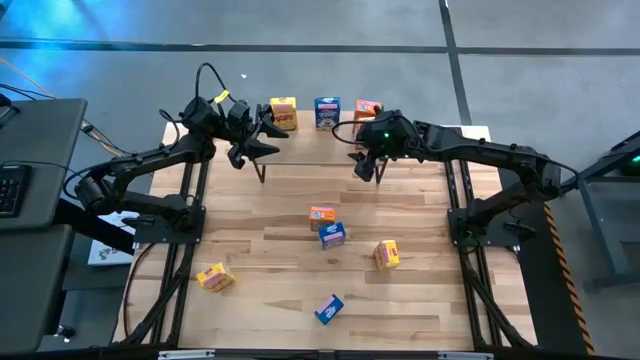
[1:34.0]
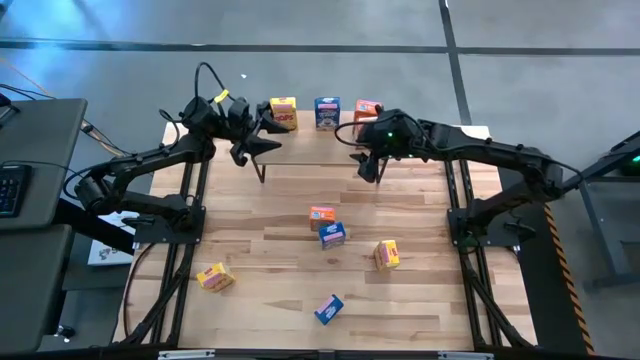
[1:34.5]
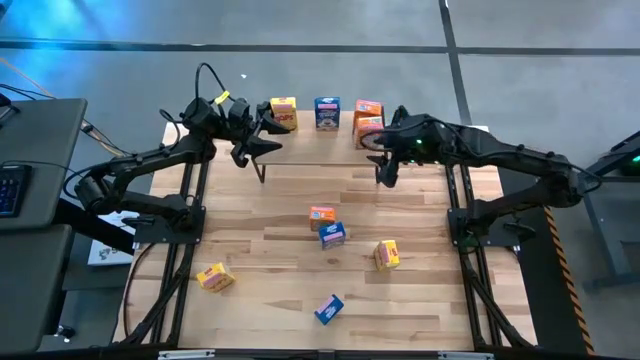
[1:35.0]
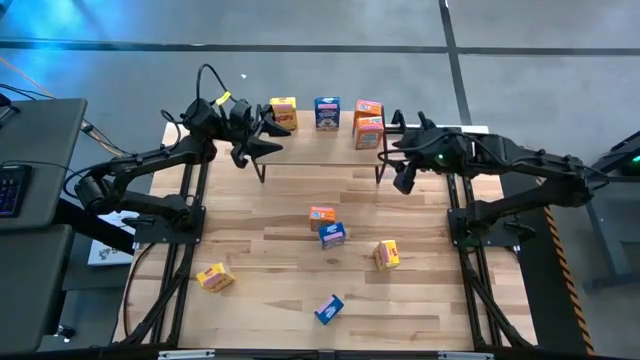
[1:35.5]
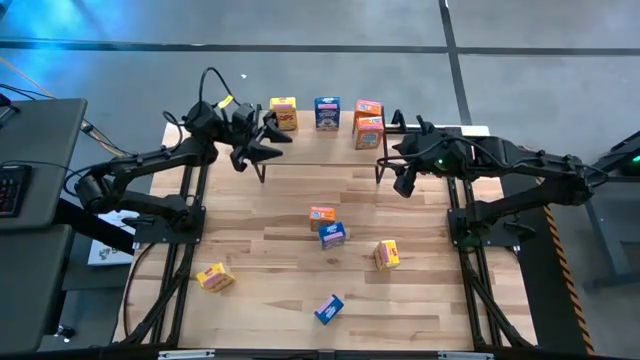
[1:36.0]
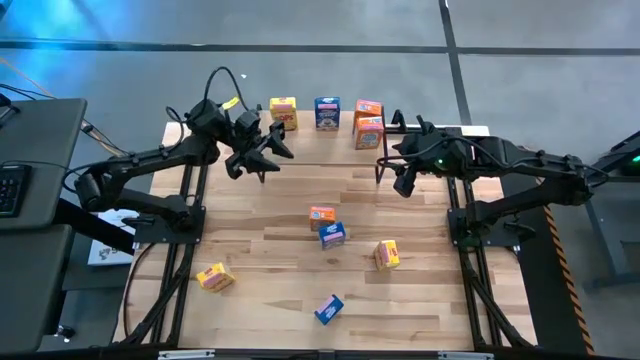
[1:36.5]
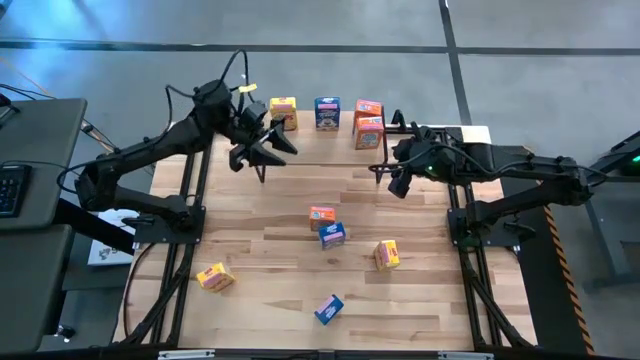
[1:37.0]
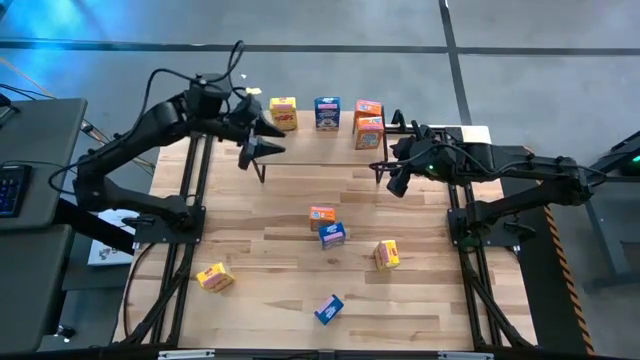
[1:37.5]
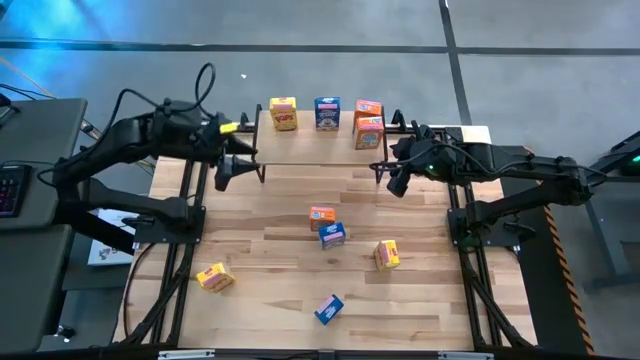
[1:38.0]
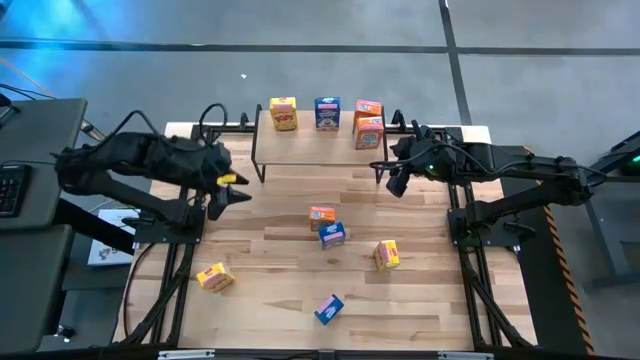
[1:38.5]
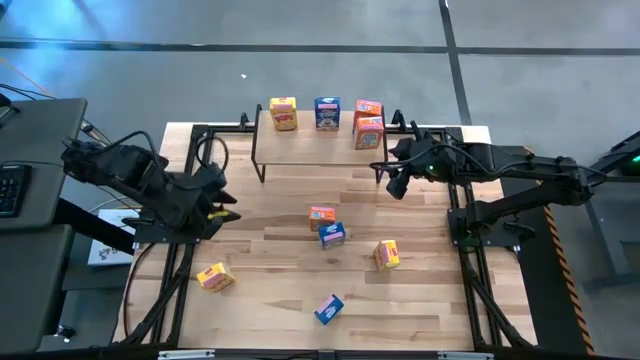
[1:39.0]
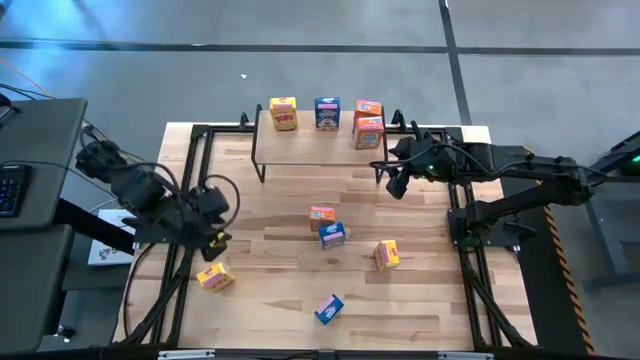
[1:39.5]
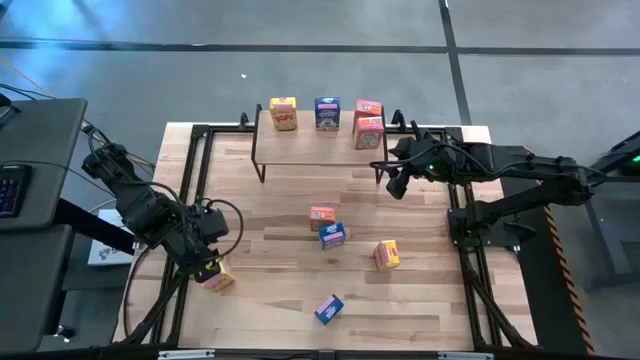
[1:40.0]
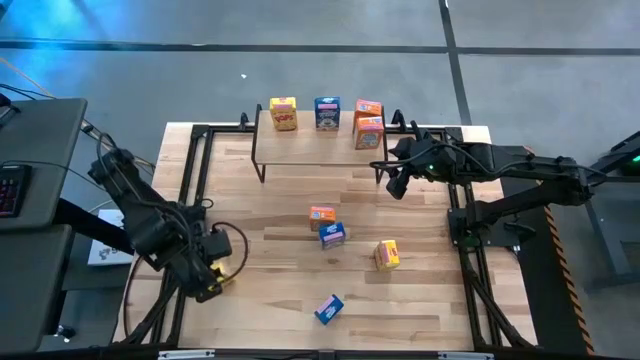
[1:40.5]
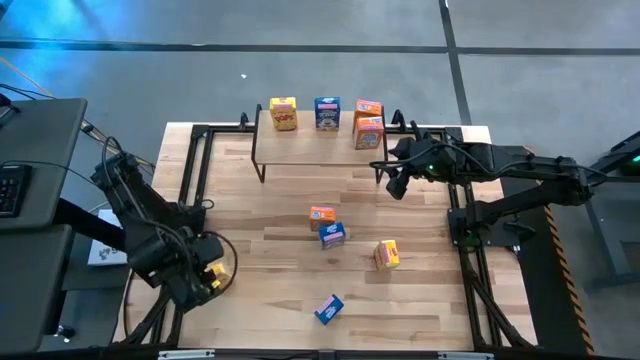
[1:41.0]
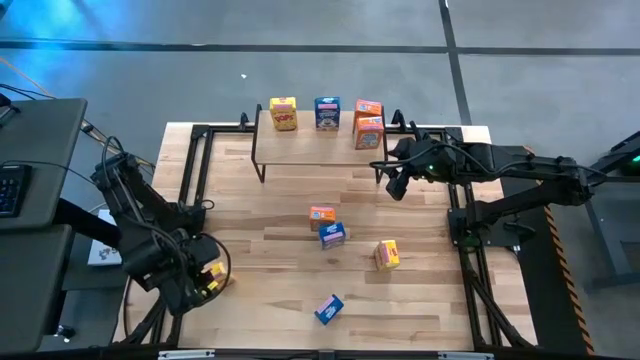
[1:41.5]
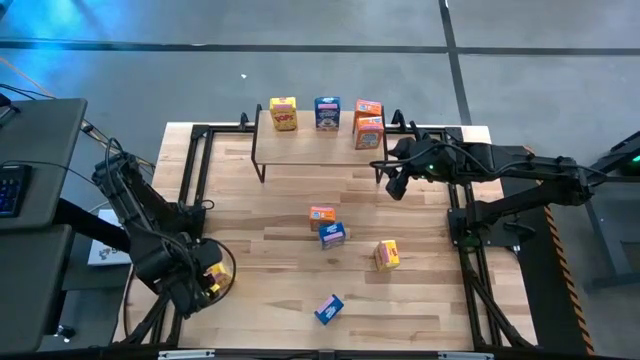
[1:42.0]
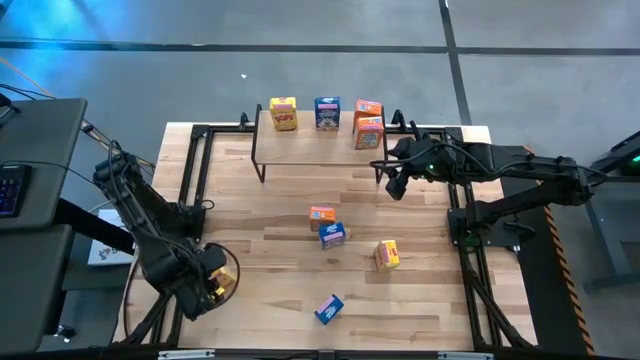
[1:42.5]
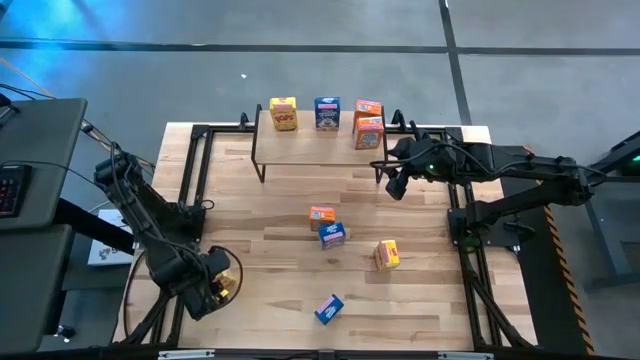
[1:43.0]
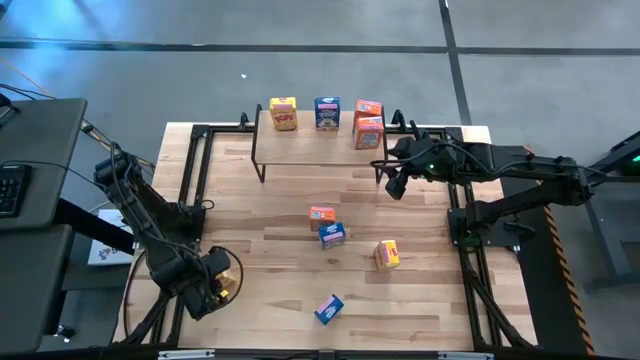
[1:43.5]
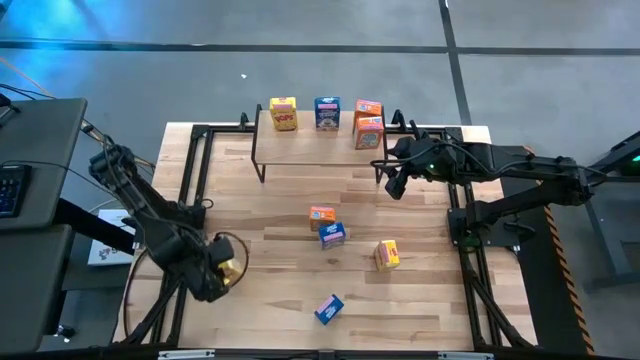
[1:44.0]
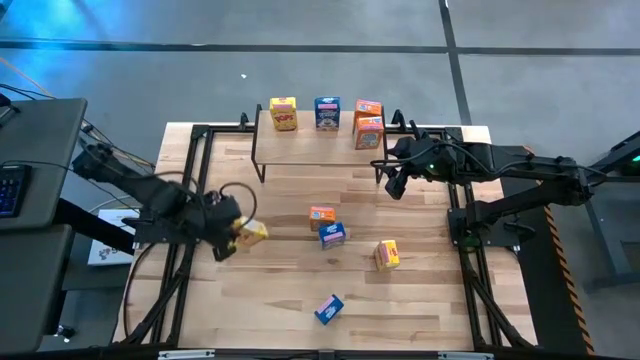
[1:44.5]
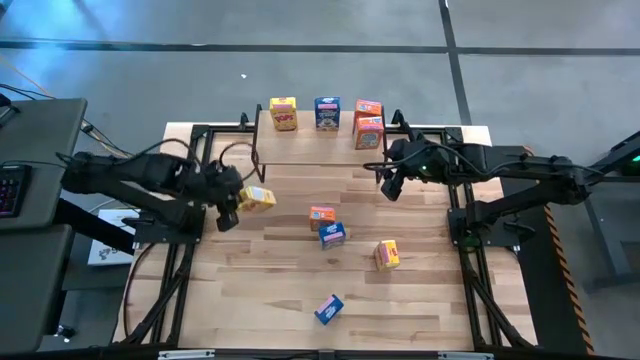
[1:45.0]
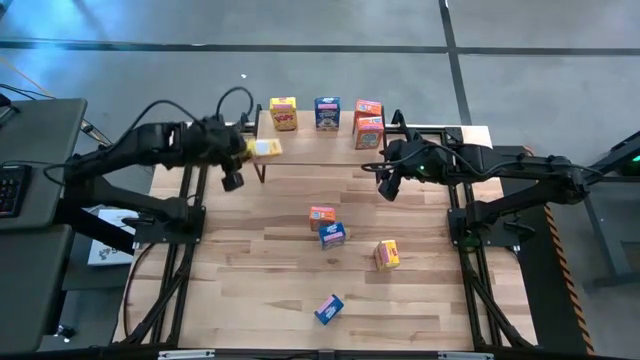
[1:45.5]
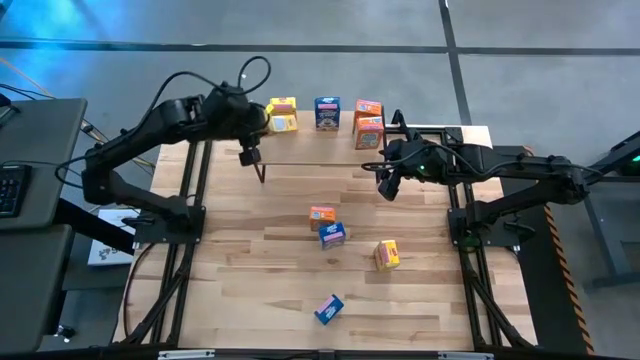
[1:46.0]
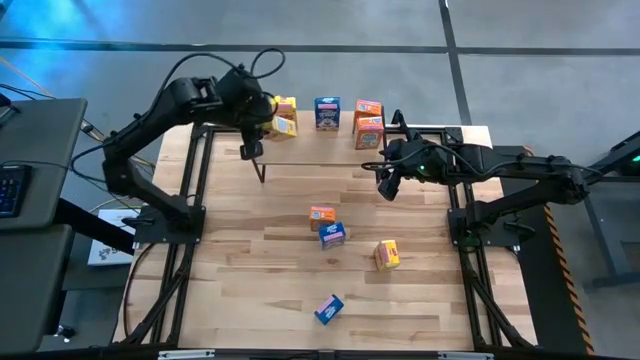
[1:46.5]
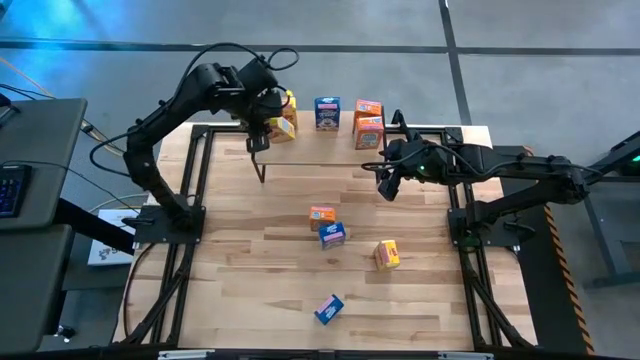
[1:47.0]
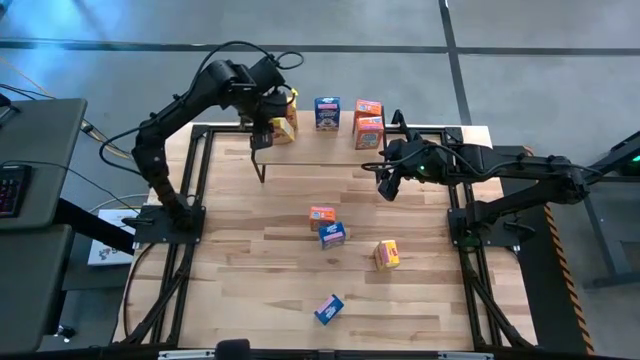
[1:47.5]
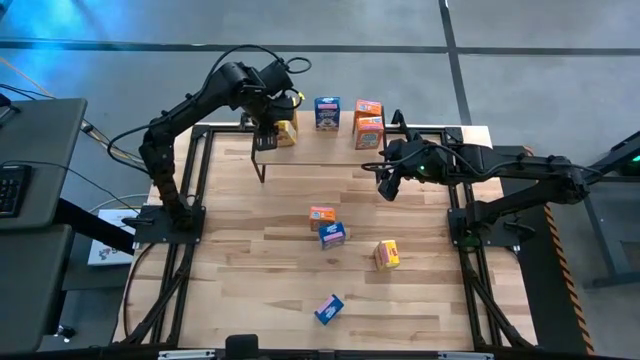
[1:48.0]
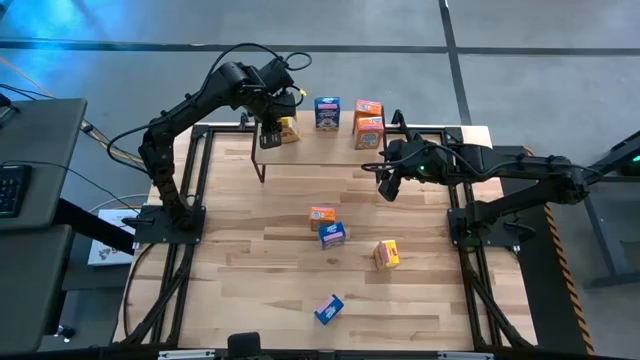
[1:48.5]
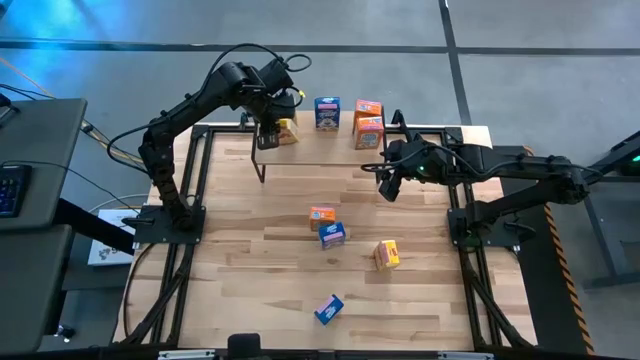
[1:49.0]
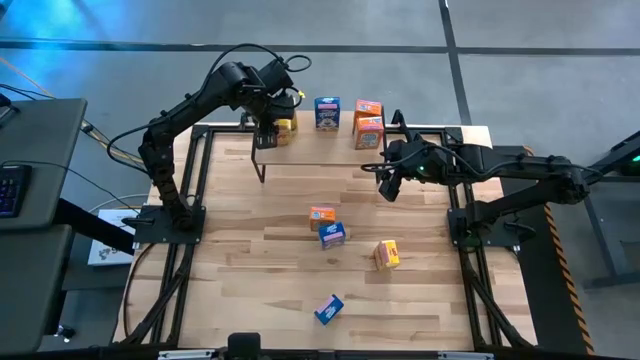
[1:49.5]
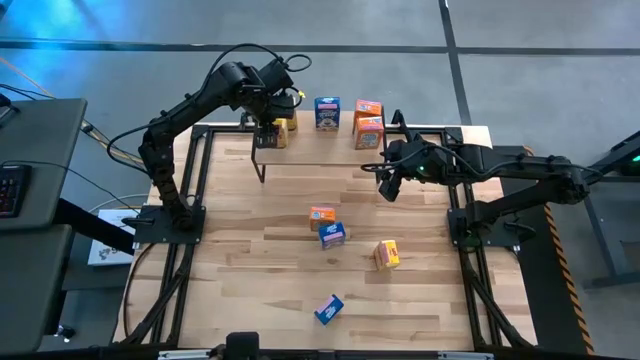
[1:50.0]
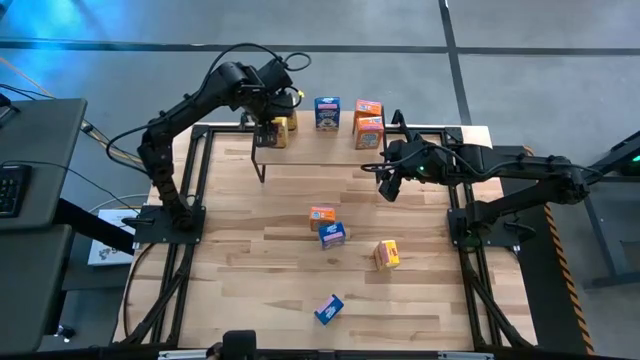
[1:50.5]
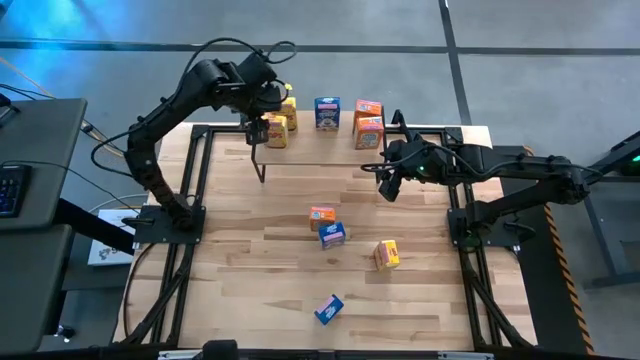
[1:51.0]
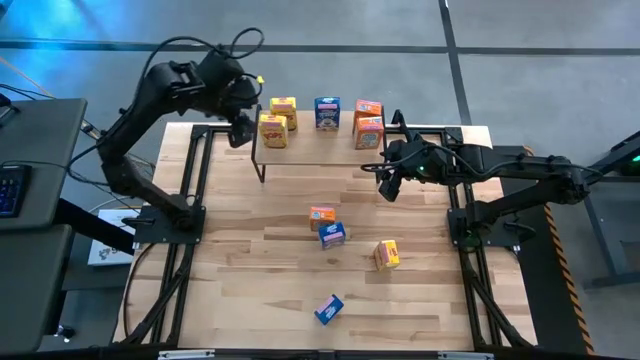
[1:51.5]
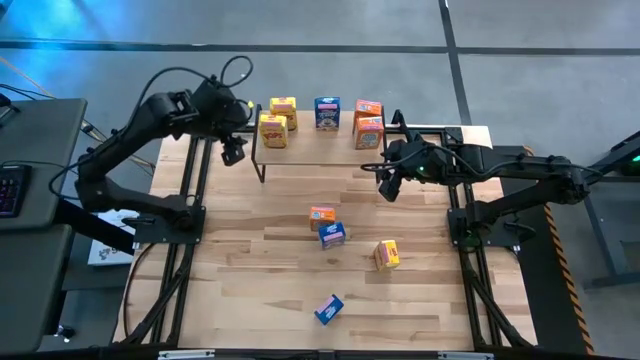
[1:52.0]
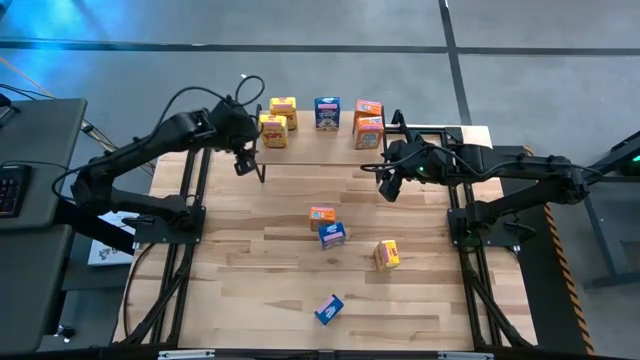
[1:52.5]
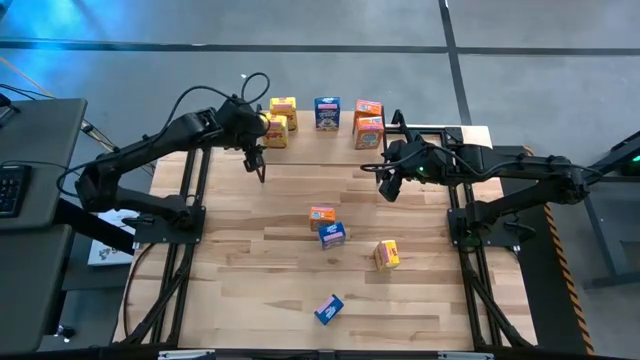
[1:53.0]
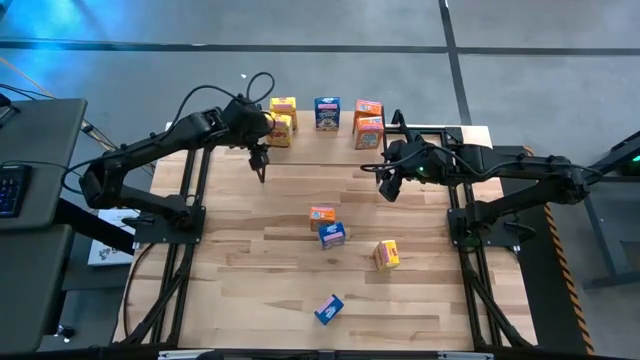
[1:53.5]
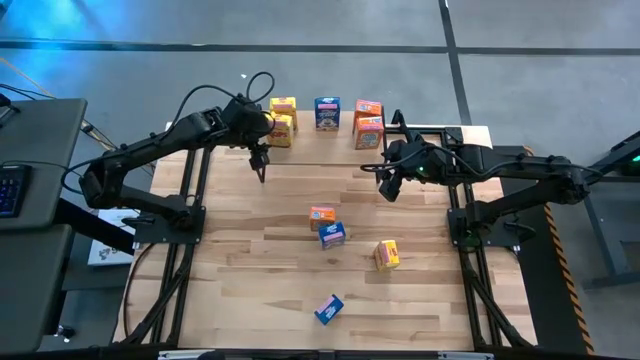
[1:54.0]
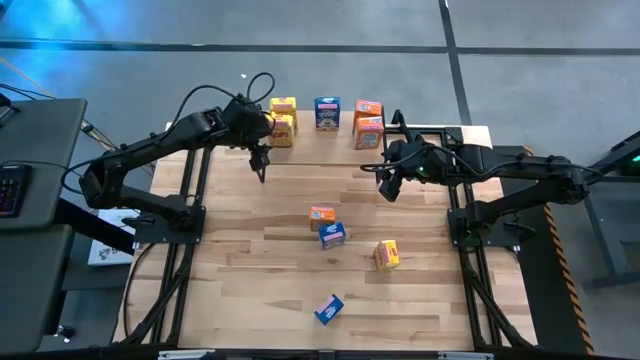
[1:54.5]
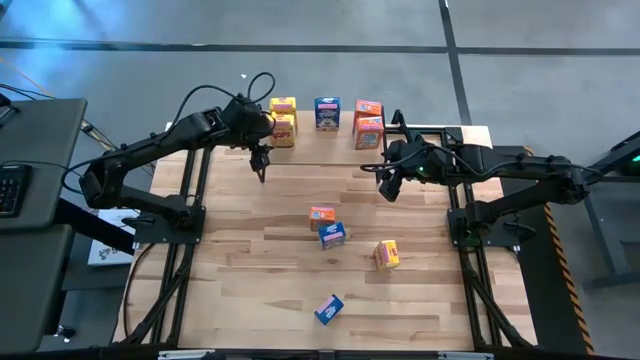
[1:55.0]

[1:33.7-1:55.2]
Task: Stack cereal on shelf
Put the left yellow cereal box on the shelf aligned with the other yellow cereal box
